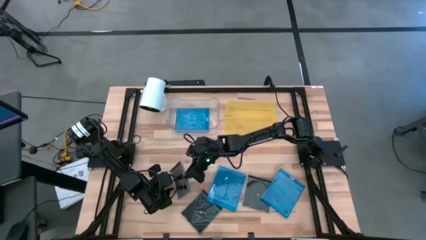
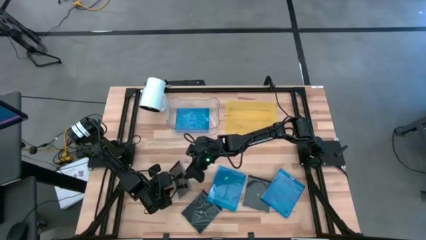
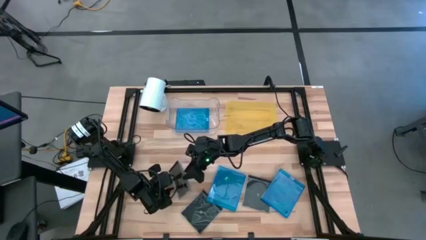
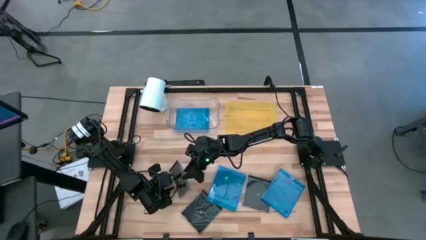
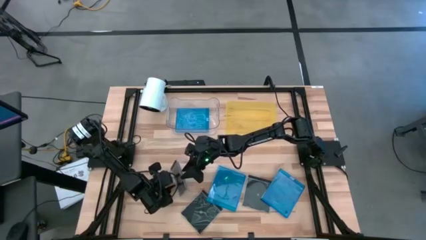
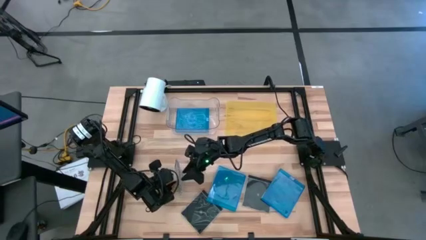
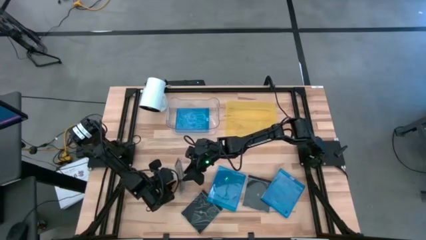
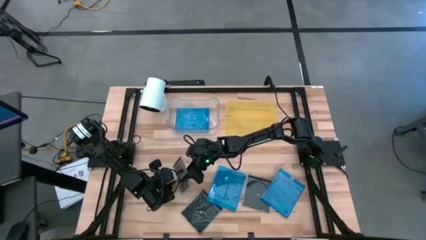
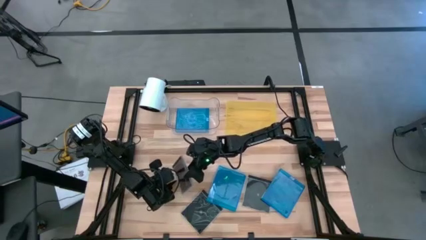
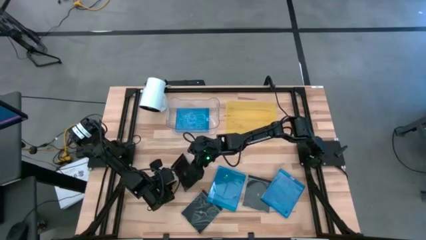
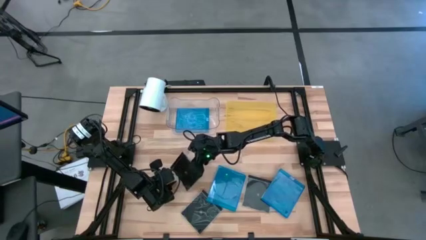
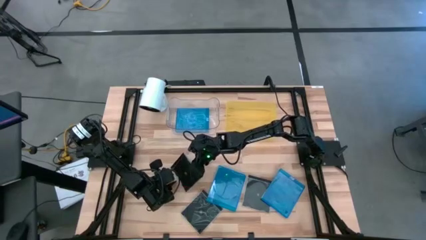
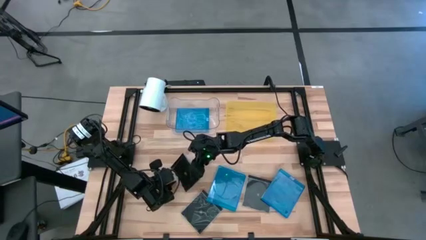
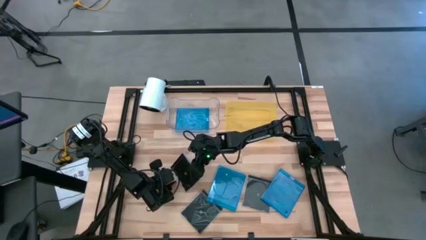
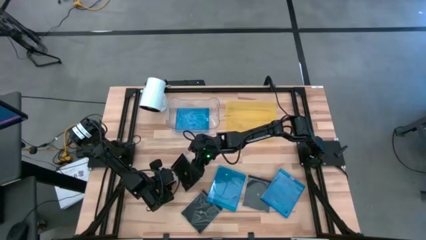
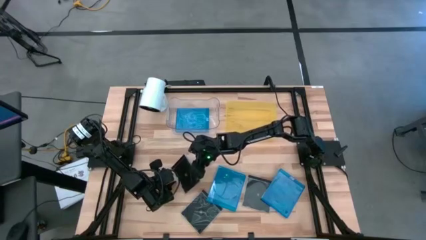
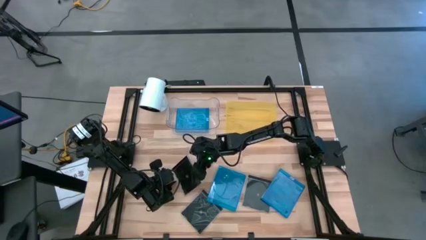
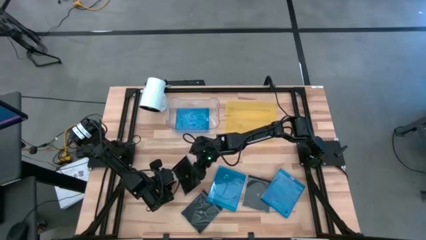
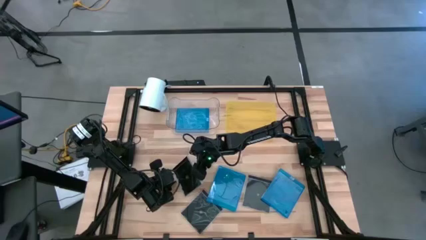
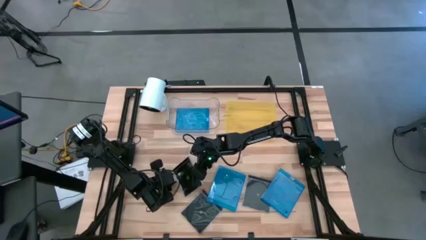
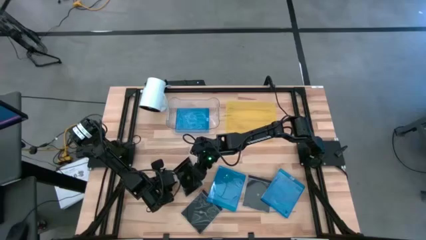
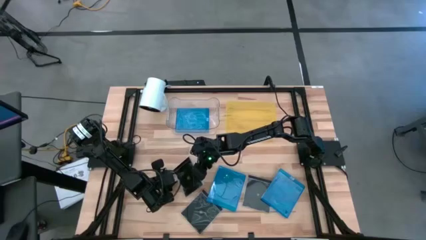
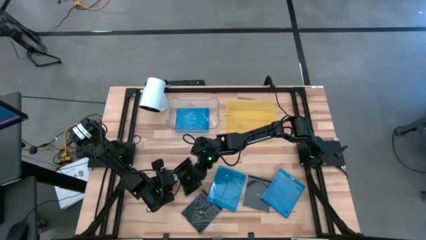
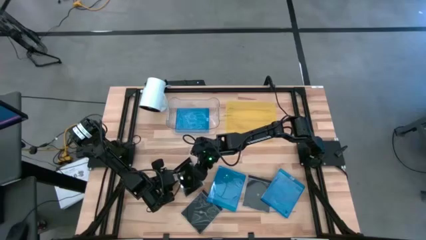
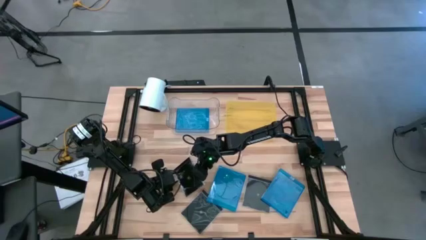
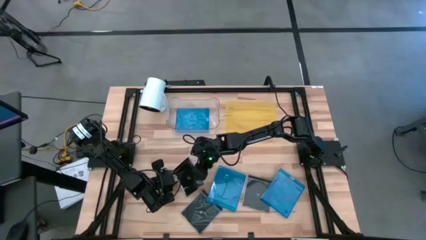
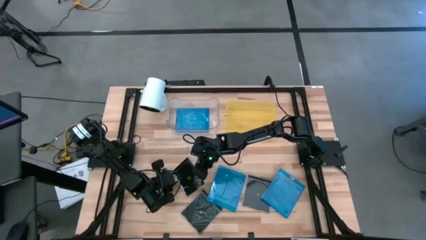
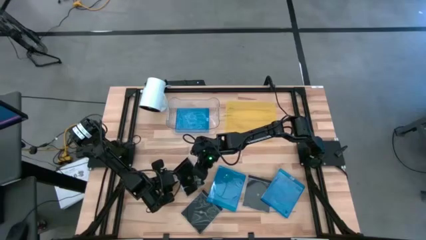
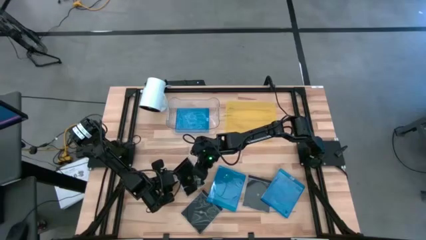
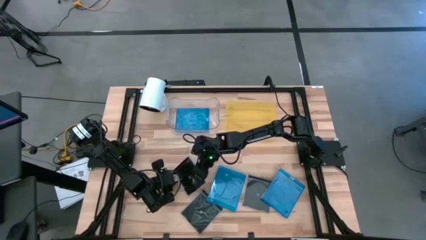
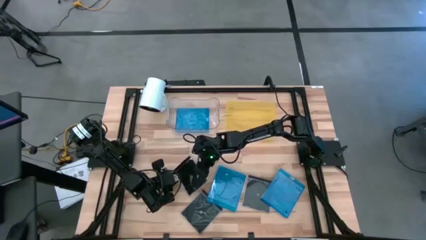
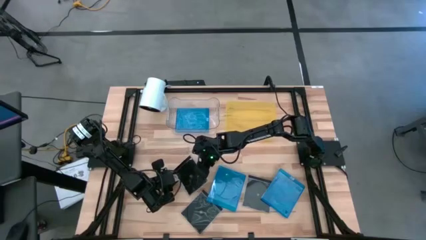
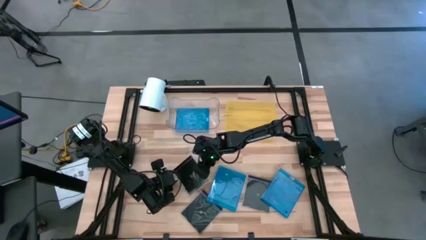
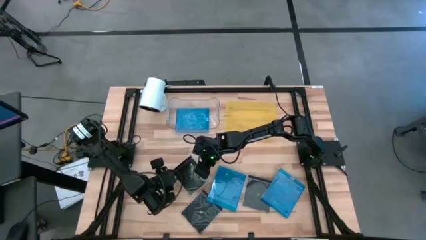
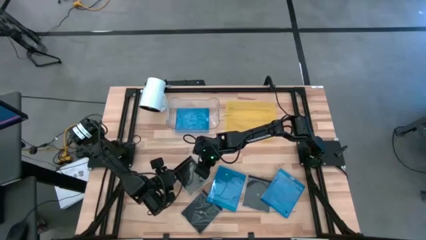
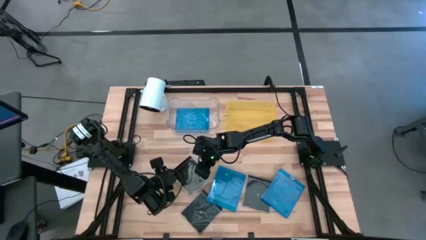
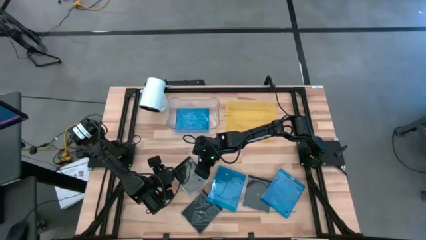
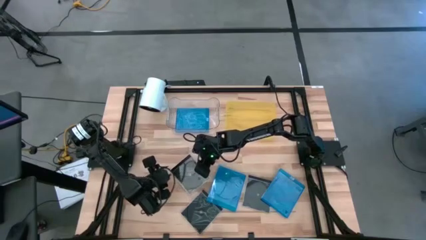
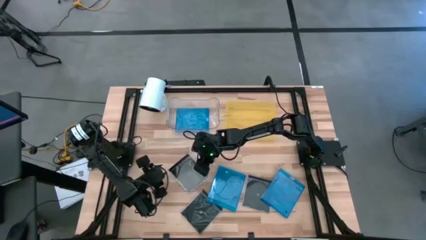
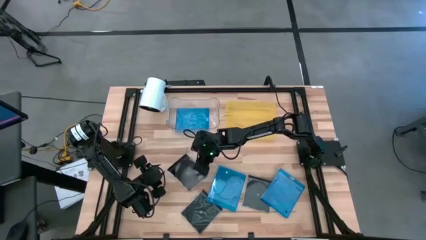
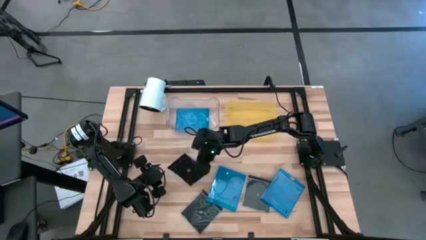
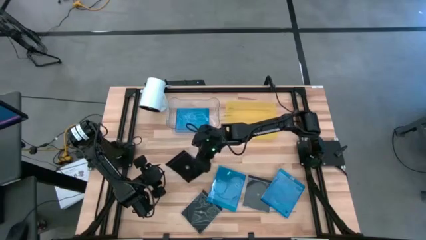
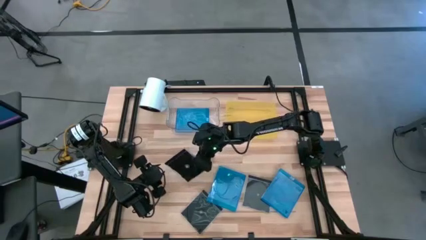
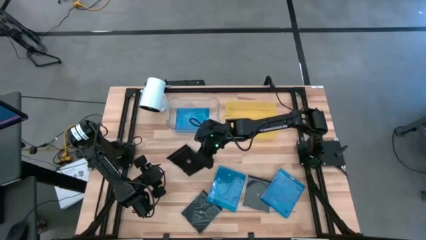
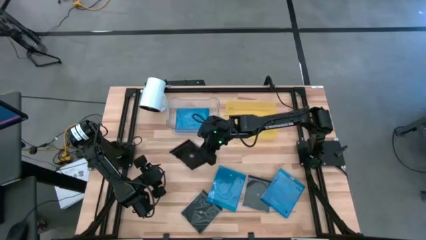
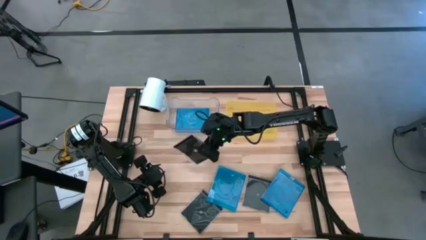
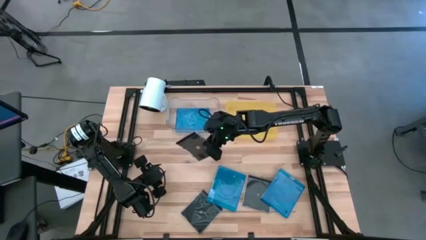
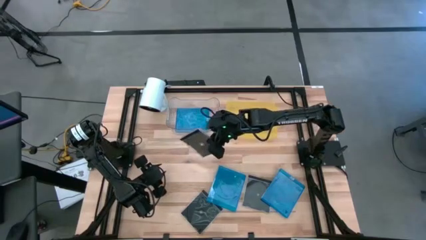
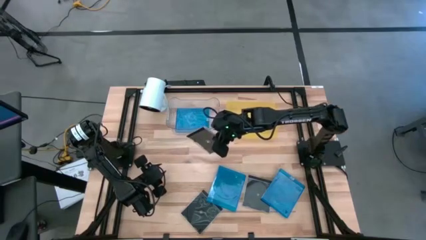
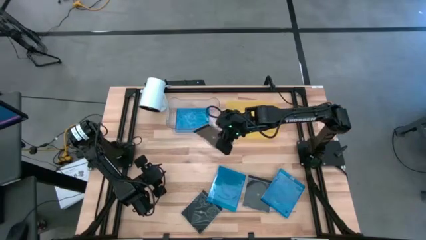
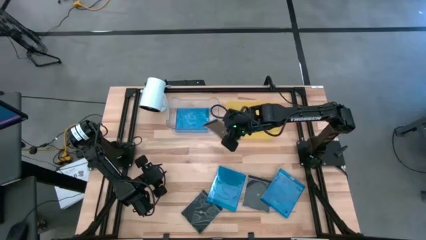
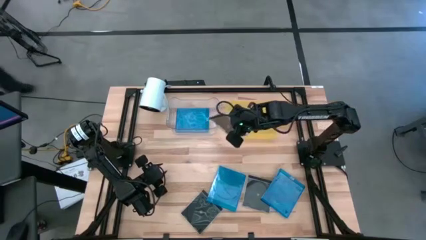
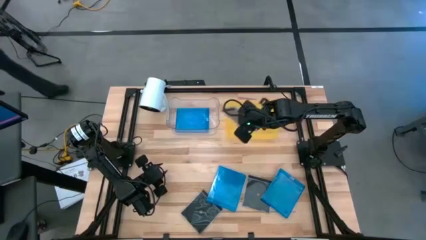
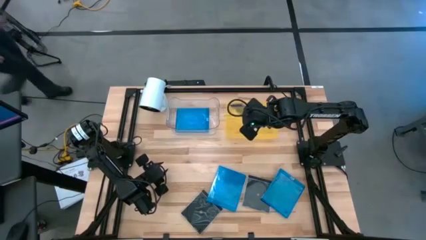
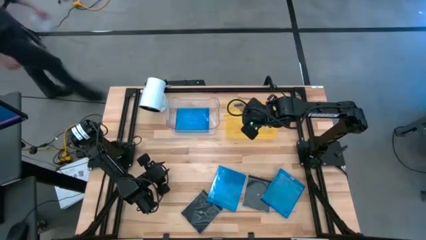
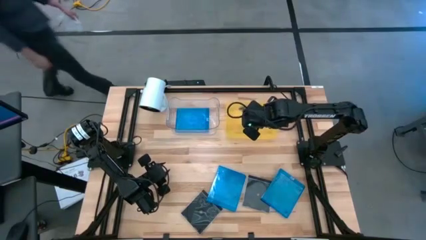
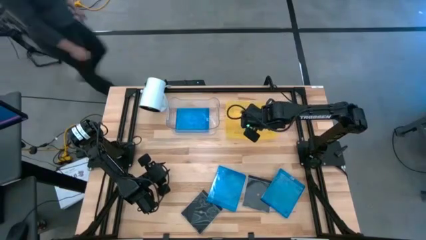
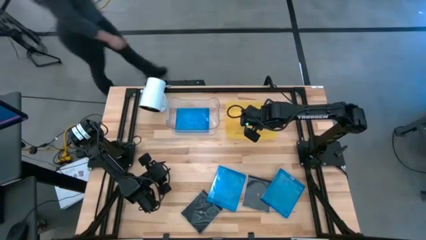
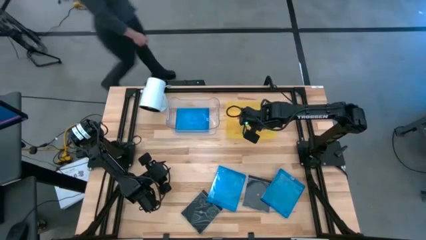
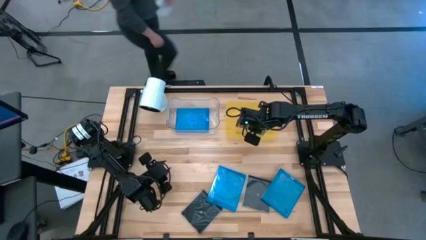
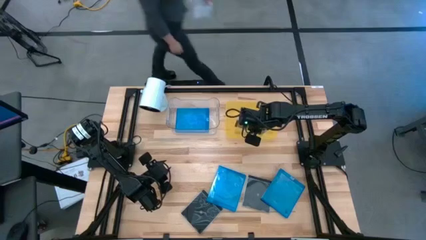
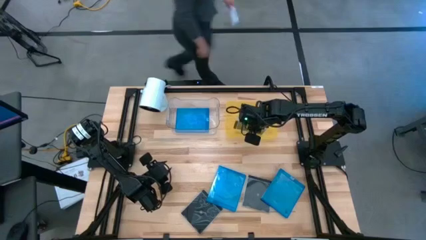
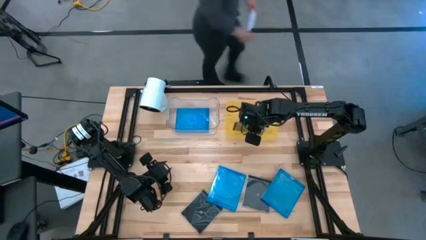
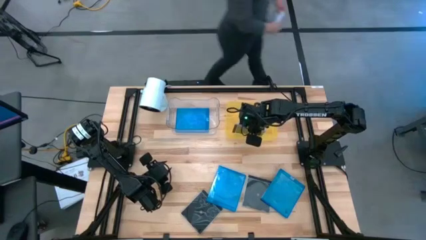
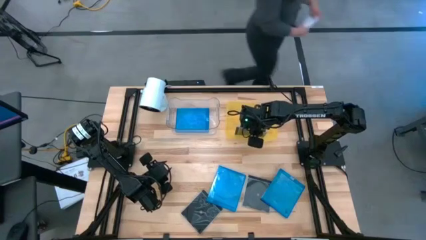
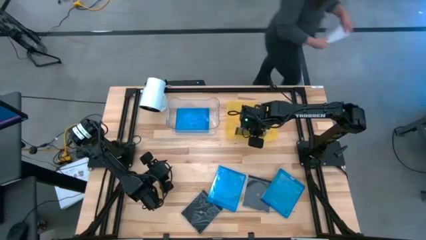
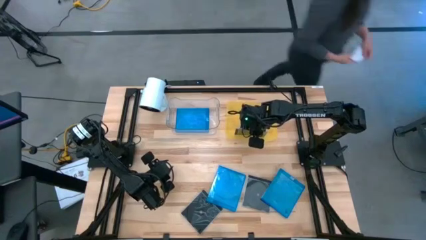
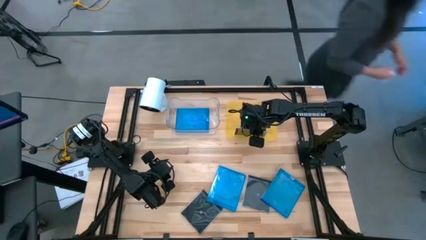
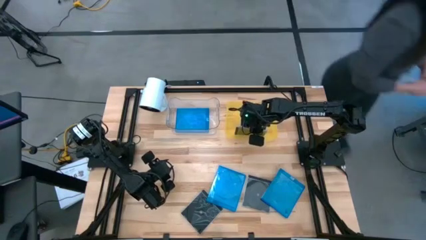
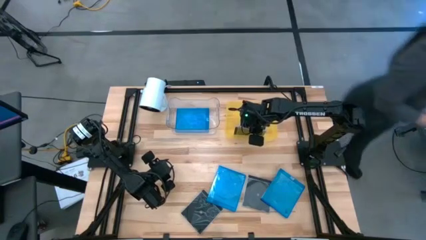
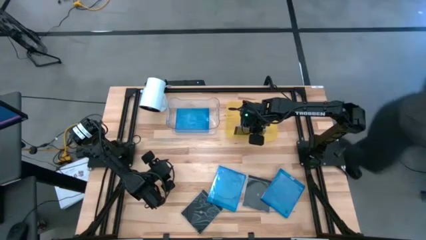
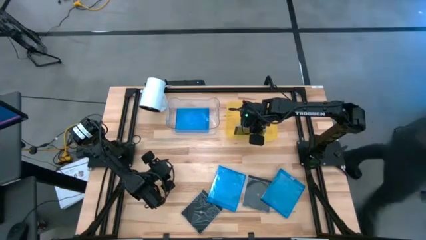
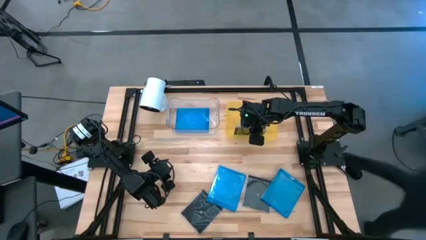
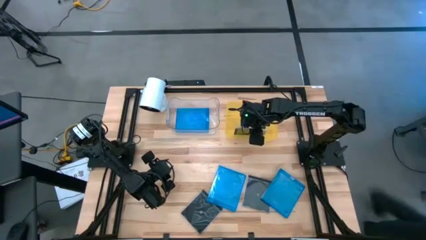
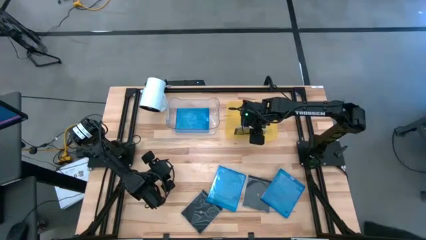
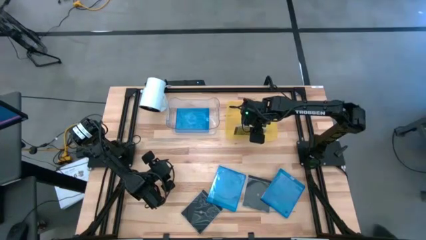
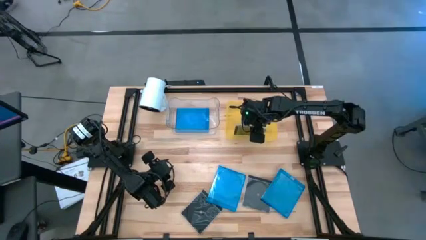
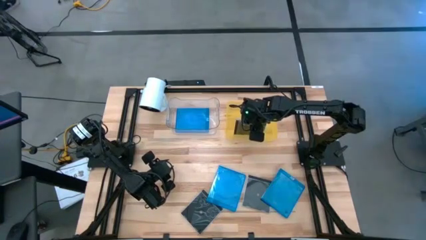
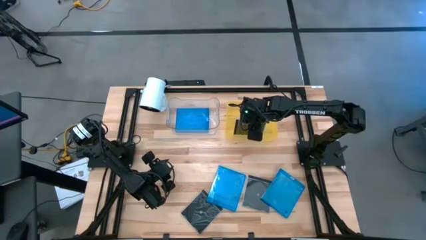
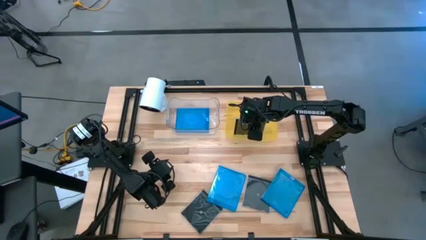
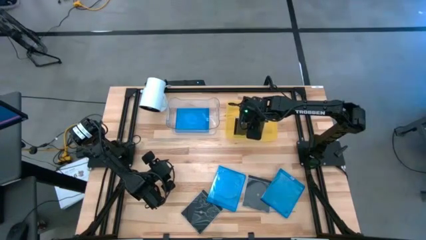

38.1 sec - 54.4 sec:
Task: Pick & place jewel cases by type
Put the left black CD case into the yellow bin
